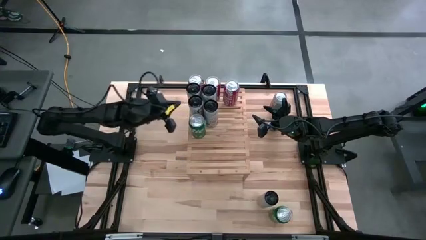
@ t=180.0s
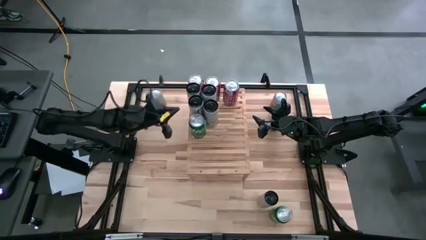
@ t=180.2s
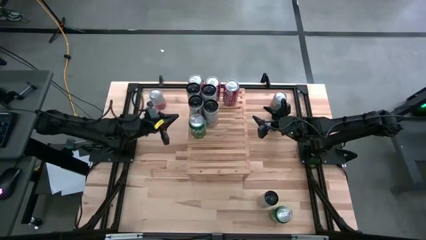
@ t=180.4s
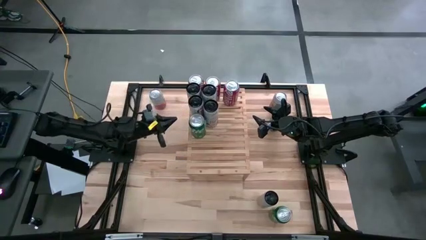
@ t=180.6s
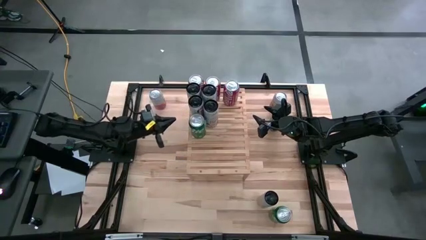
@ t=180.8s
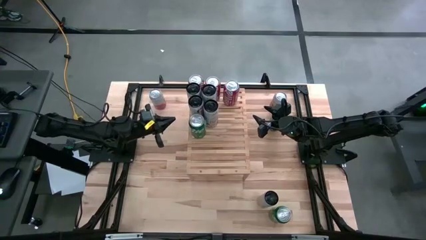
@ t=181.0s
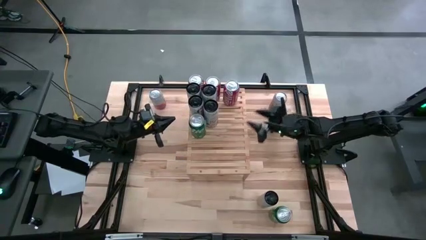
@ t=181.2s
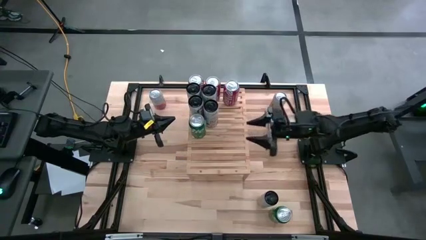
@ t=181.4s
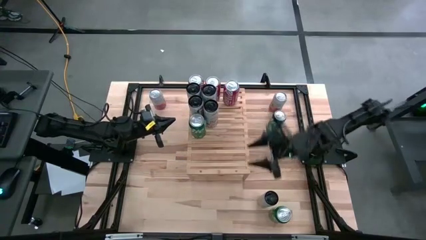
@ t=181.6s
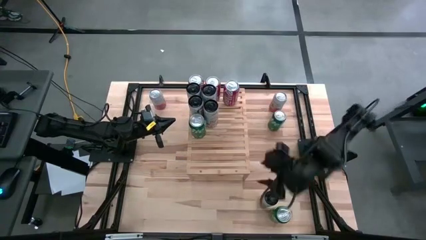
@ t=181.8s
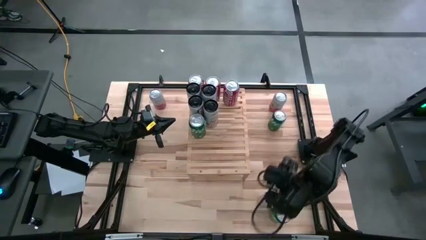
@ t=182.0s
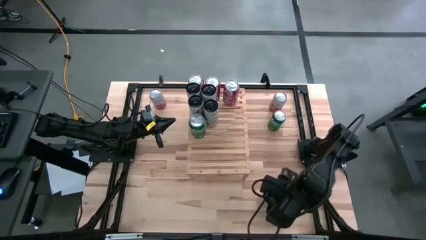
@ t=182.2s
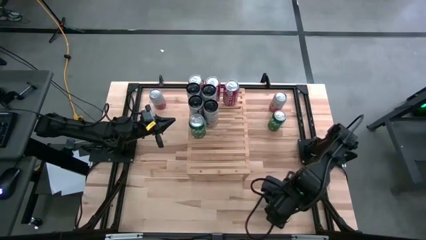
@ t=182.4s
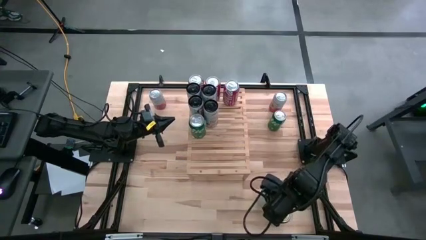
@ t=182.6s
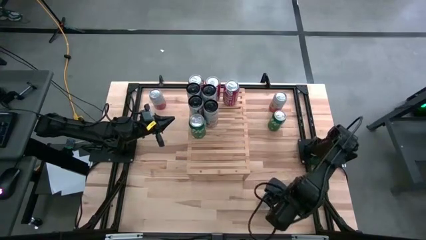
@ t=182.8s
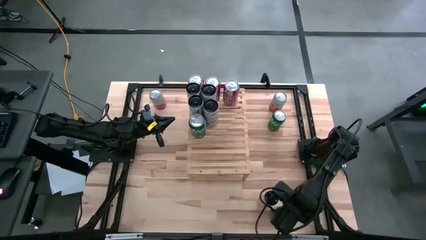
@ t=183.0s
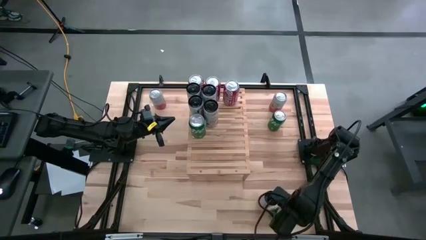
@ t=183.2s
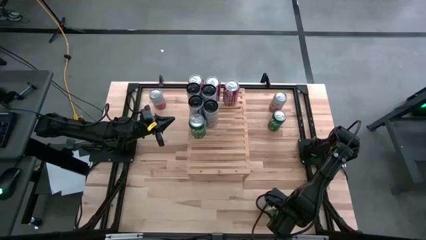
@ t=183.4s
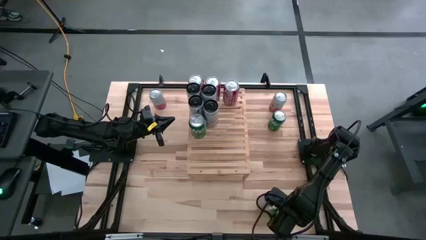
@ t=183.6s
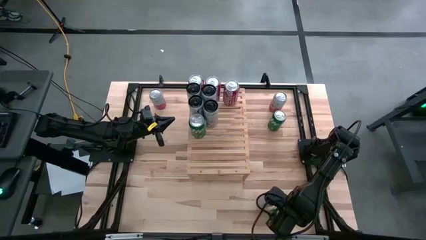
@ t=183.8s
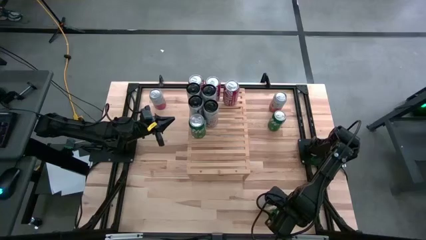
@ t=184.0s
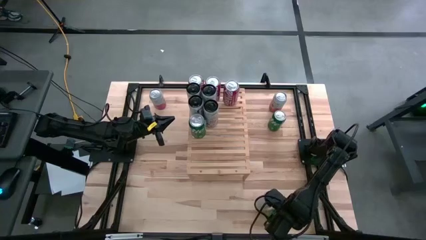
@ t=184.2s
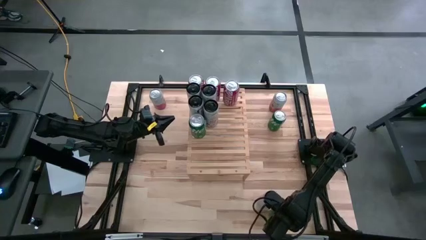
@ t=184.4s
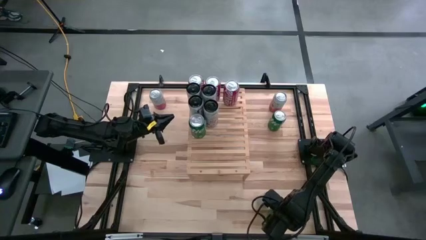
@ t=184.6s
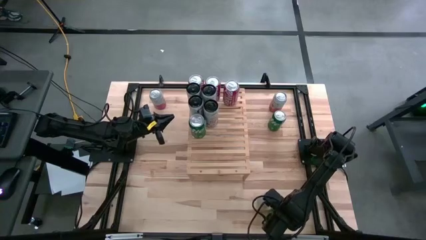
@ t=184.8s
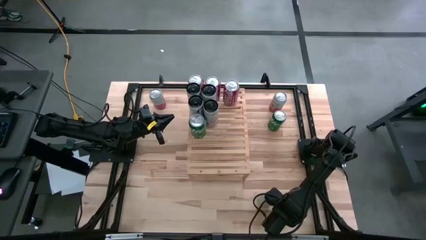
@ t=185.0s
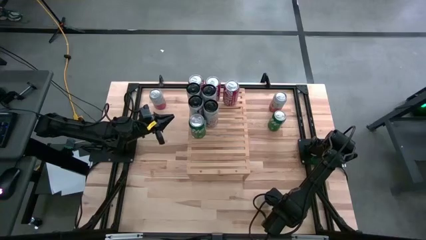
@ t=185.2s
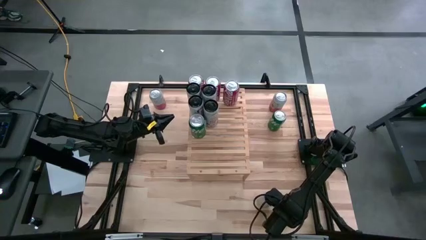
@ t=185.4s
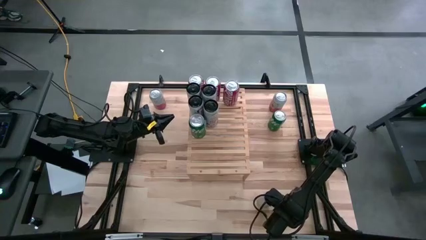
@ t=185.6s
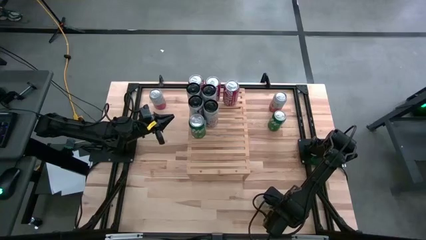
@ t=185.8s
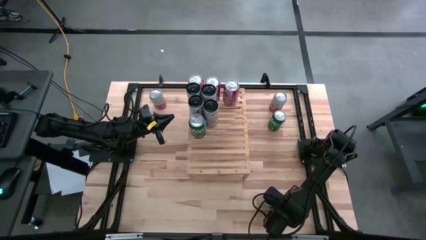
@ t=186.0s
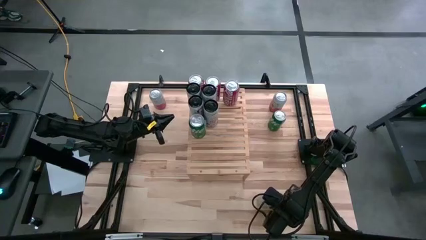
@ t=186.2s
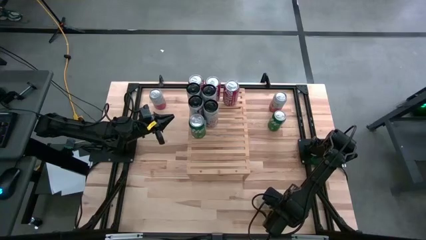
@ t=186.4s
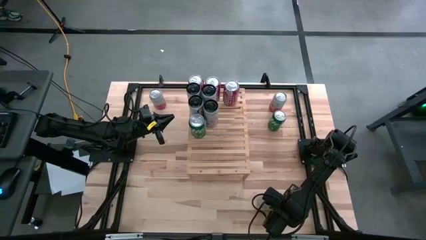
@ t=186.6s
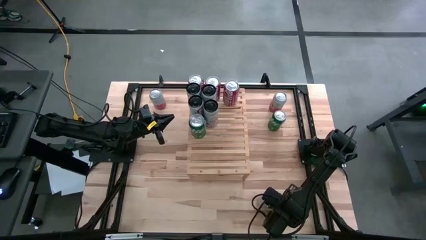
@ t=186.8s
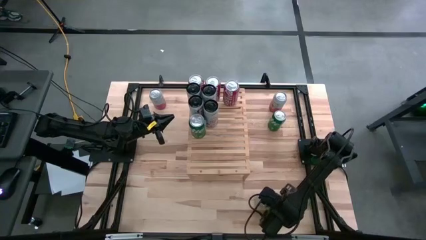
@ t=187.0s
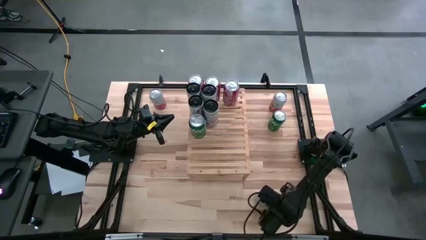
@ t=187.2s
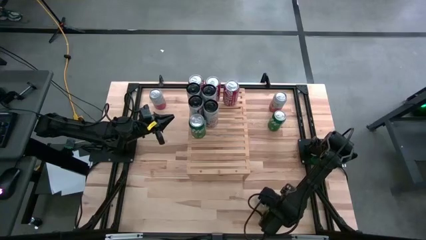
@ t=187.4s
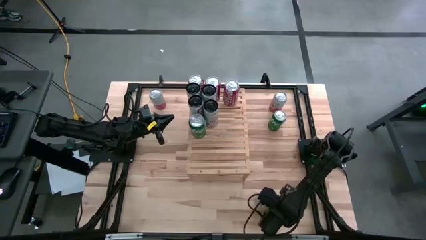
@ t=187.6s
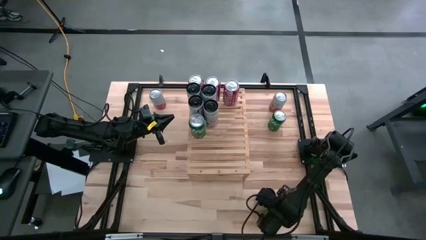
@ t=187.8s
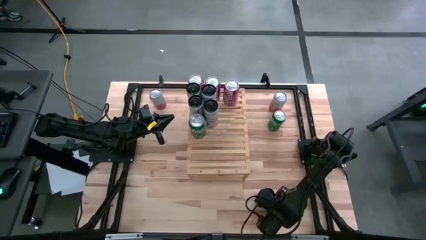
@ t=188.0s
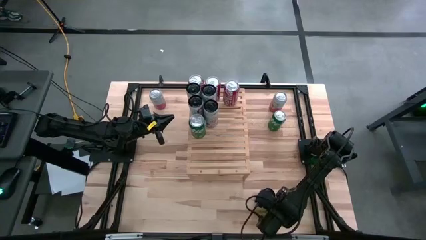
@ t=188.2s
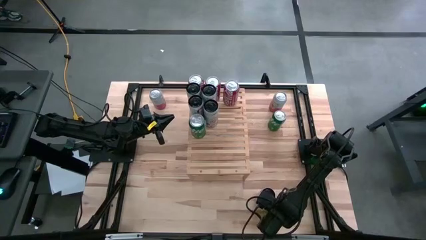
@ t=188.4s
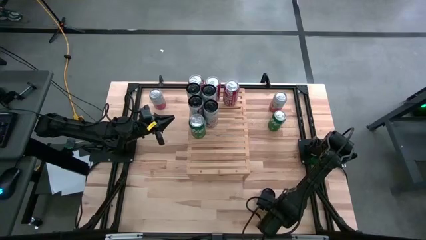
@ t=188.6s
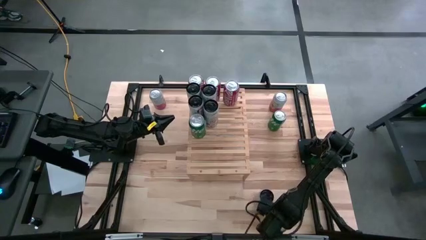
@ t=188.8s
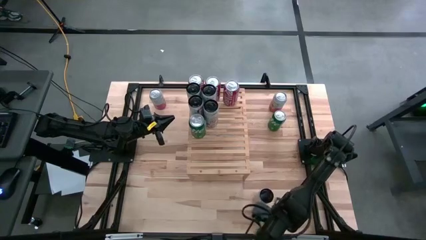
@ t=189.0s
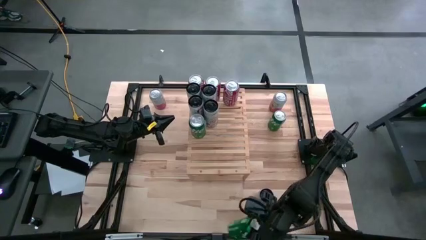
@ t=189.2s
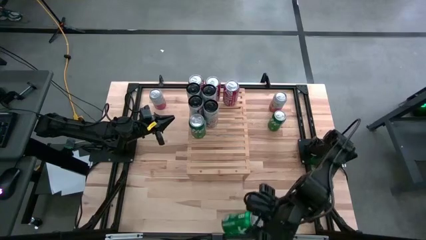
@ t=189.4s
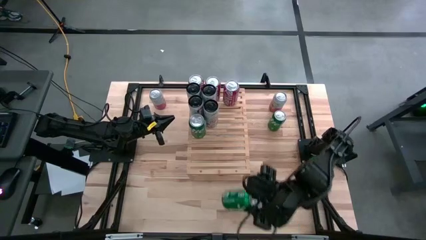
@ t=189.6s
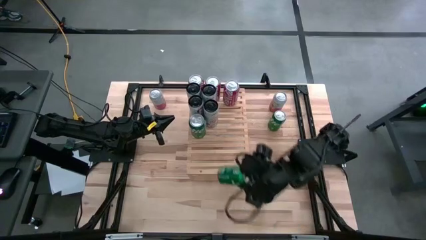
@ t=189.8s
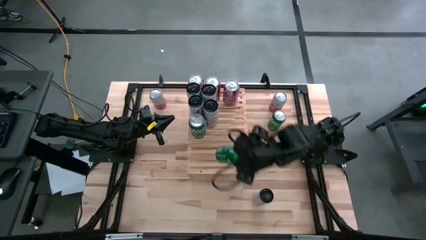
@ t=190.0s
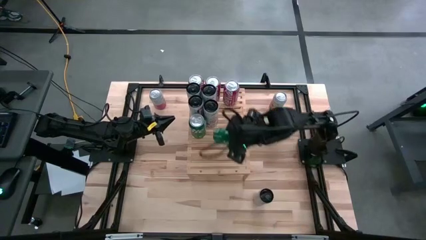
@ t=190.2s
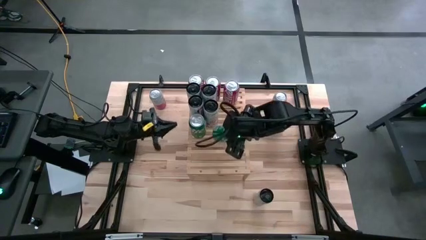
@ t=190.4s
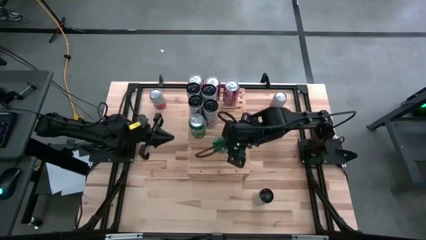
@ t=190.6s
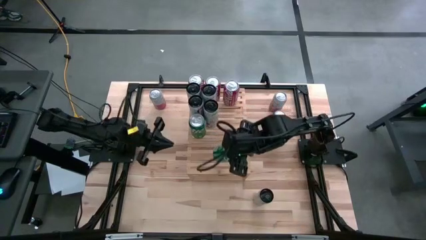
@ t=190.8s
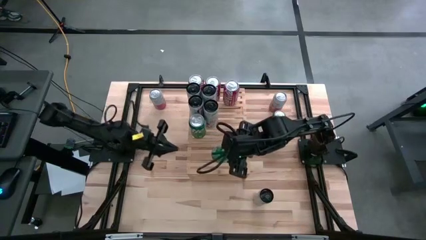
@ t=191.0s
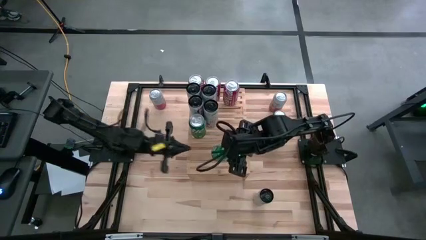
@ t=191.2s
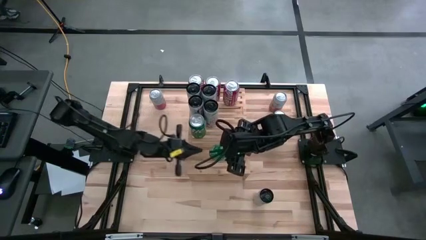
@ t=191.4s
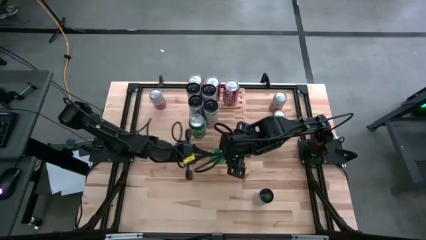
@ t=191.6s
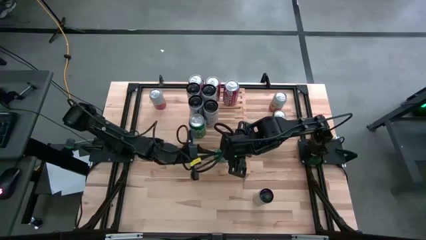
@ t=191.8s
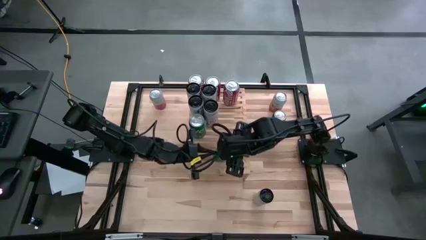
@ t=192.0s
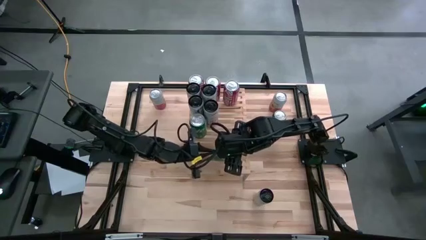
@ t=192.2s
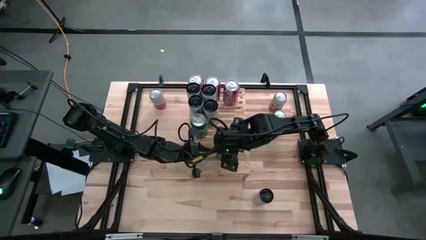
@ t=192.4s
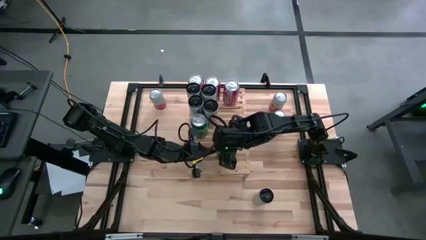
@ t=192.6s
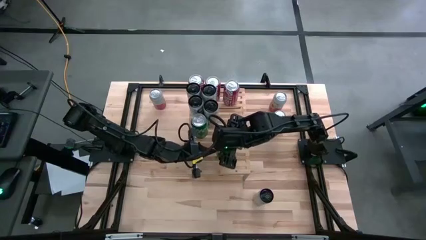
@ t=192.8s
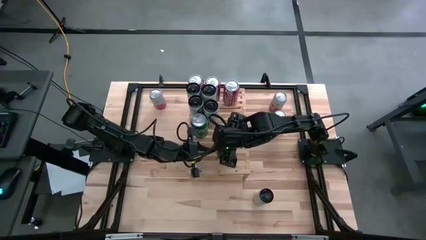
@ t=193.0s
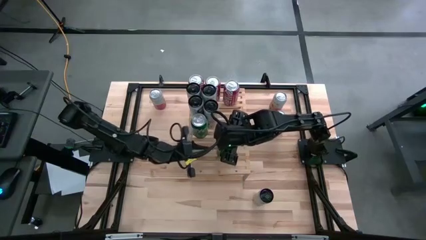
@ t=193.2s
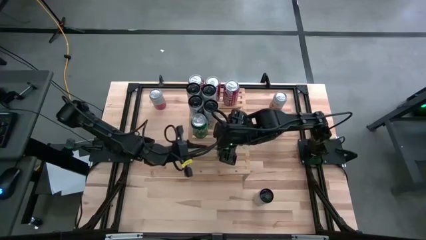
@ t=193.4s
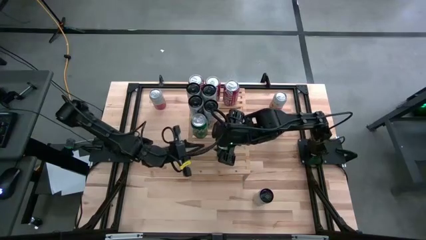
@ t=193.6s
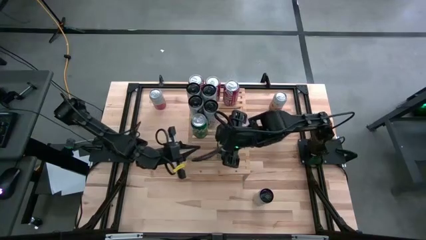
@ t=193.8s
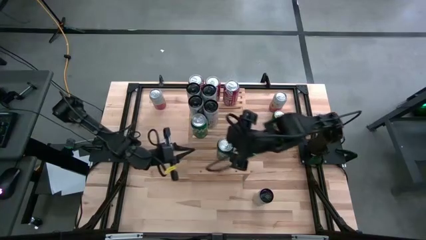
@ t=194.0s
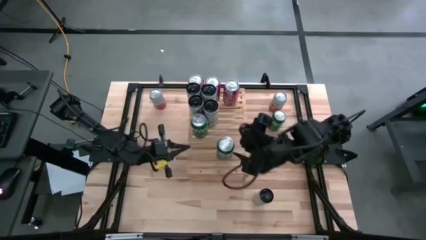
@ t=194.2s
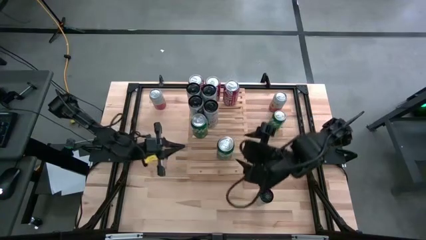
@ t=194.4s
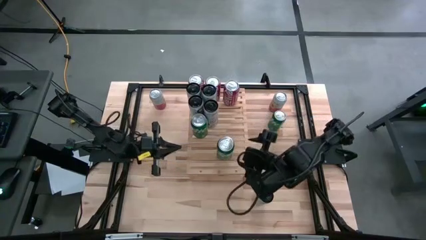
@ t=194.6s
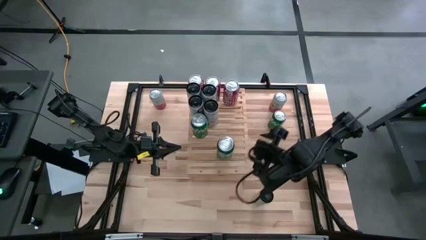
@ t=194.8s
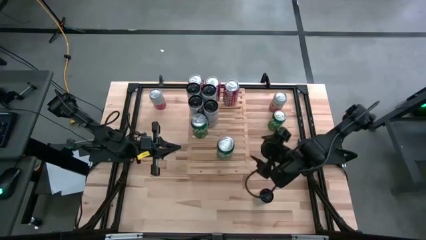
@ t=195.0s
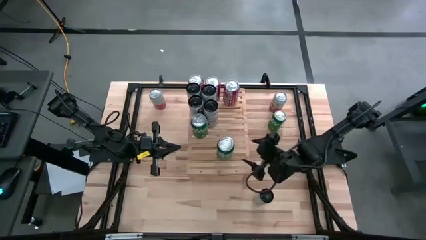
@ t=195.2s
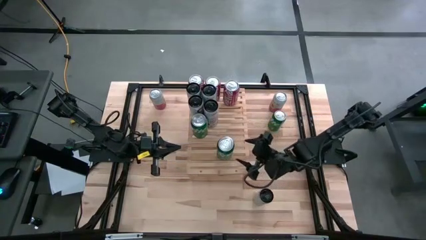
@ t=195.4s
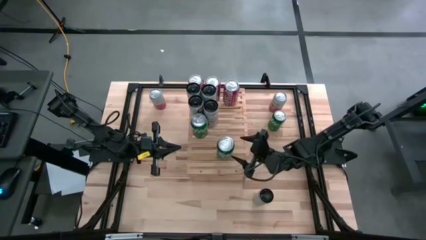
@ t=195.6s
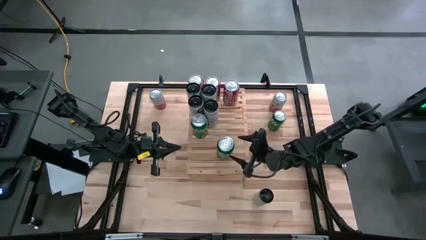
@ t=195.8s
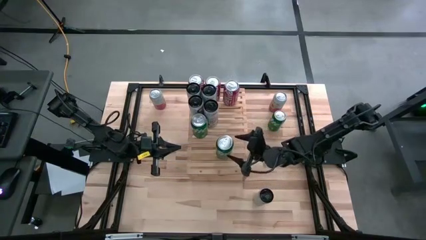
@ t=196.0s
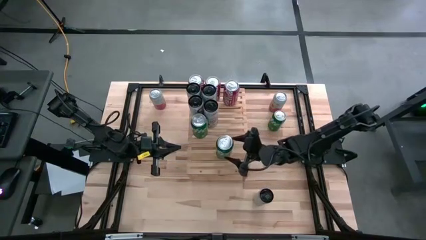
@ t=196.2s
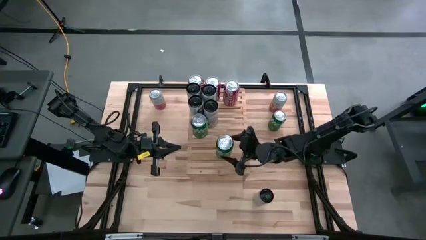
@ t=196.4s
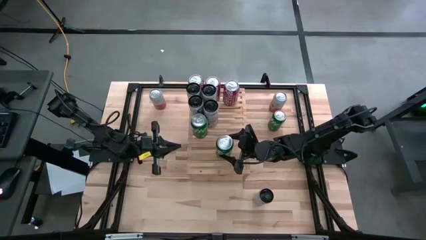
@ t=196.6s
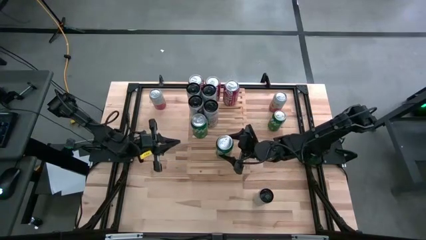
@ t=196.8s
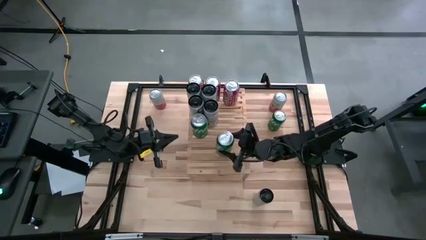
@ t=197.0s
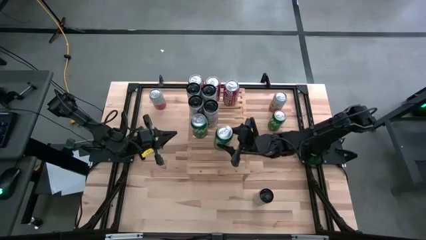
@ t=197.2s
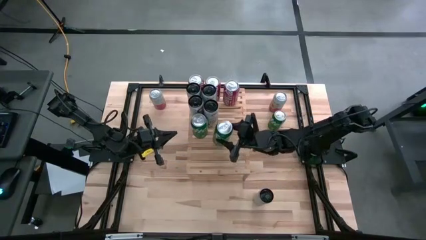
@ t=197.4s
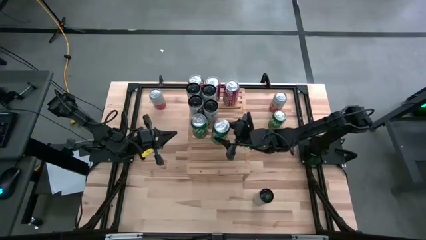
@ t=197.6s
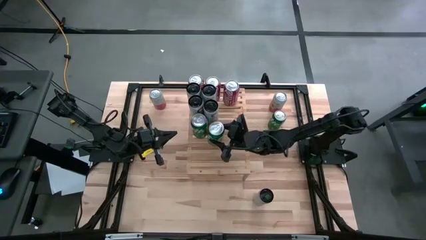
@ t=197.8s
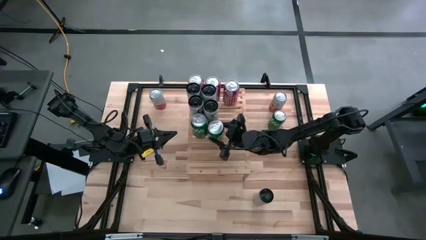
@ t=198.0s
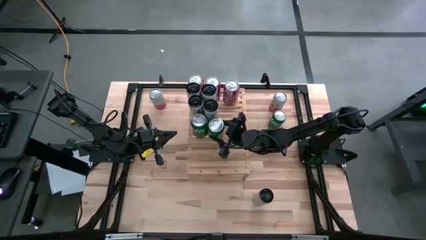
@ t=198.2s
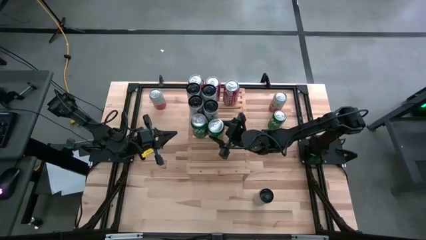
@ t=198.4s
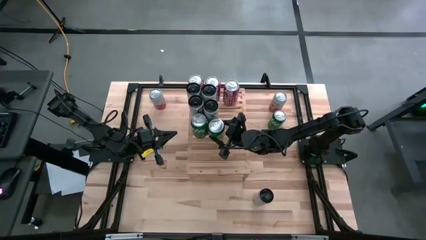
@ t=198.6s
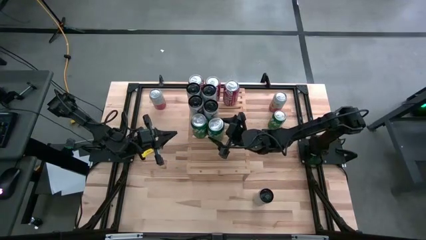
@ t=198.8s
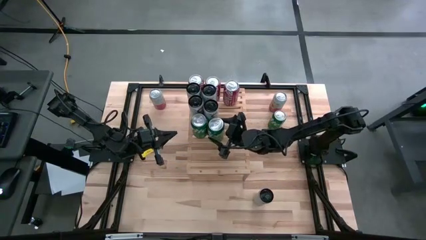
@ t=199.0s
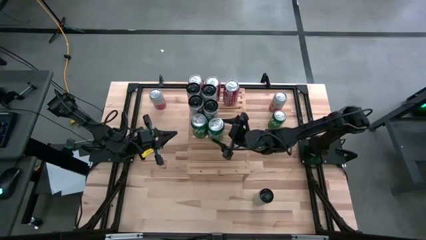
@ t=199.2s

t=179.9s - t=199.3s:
Task: Place canned beverage on shelf
Align the bottom green sprite soda can with the other green sprite soda can on the shelf
